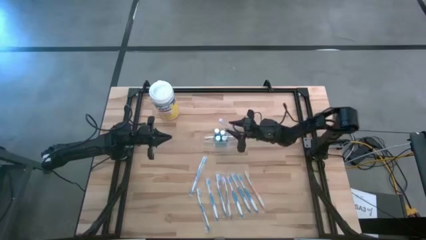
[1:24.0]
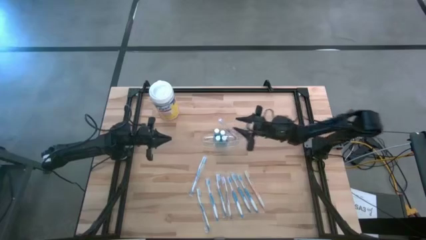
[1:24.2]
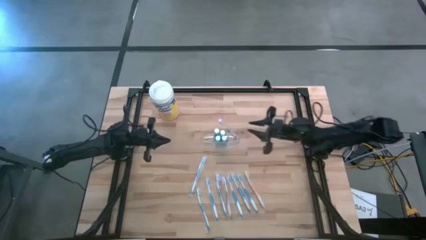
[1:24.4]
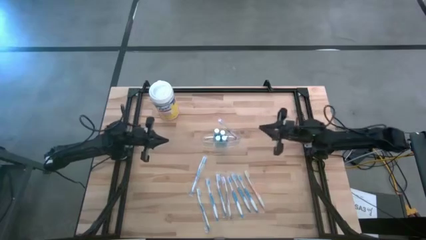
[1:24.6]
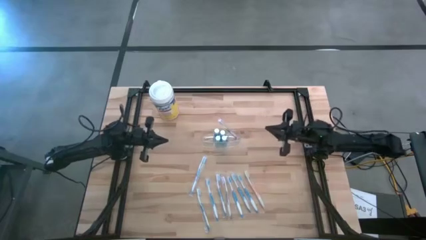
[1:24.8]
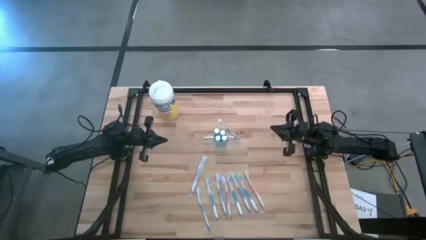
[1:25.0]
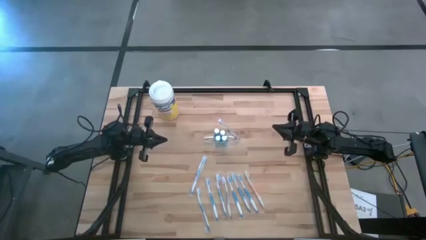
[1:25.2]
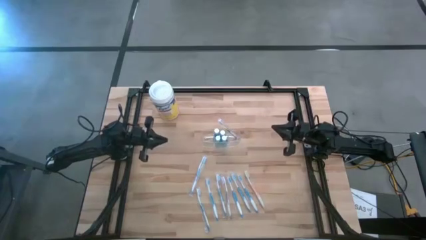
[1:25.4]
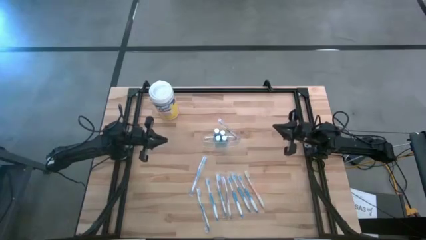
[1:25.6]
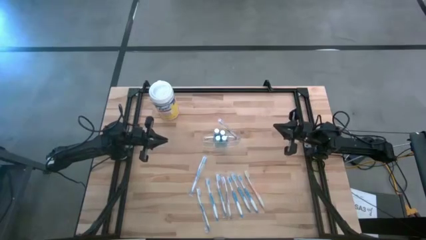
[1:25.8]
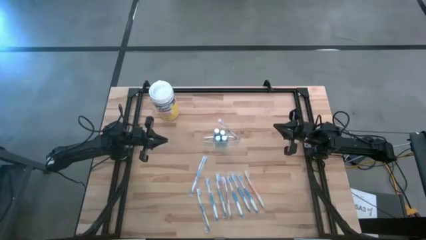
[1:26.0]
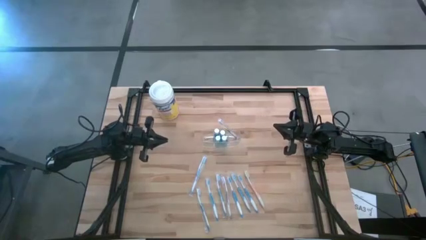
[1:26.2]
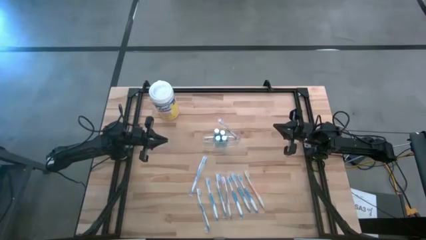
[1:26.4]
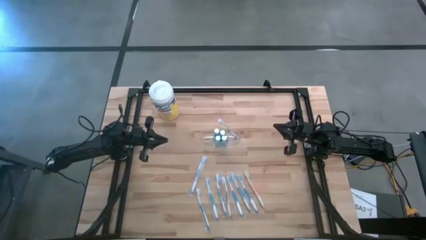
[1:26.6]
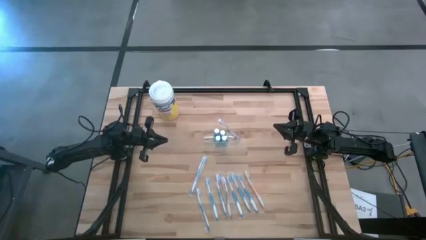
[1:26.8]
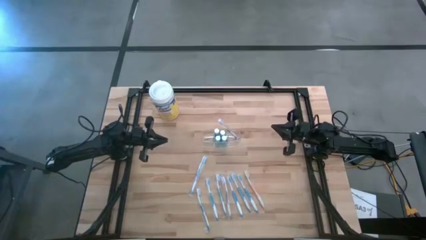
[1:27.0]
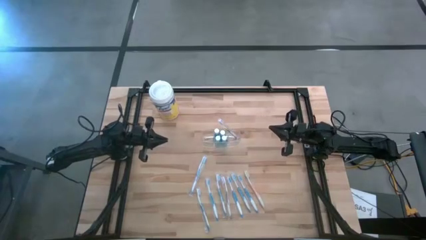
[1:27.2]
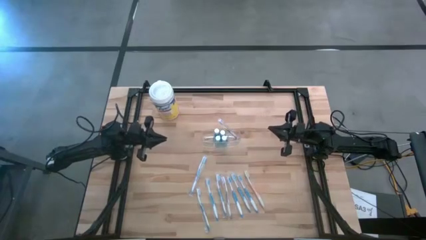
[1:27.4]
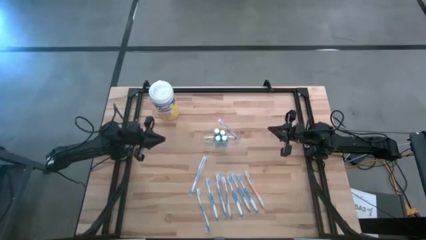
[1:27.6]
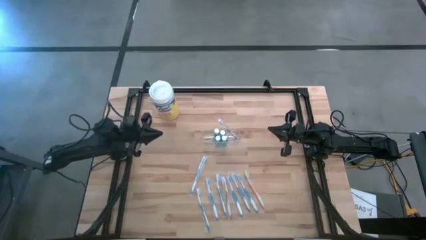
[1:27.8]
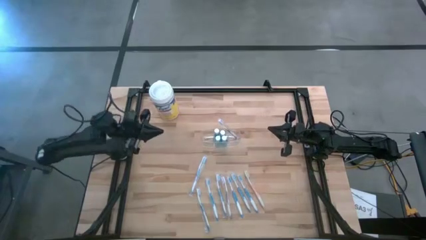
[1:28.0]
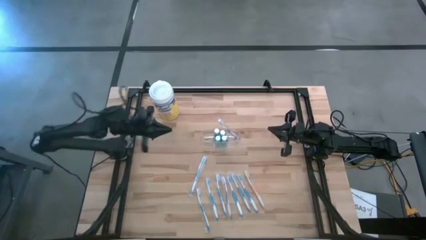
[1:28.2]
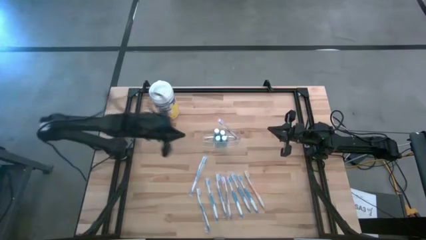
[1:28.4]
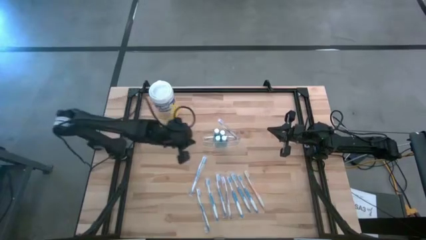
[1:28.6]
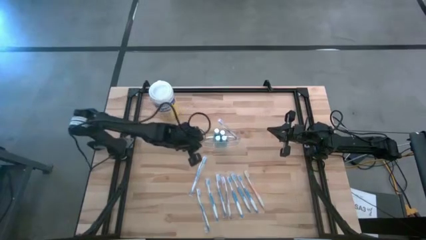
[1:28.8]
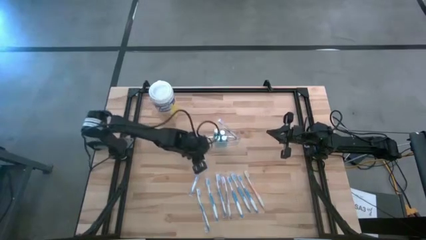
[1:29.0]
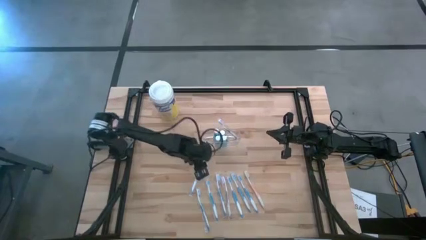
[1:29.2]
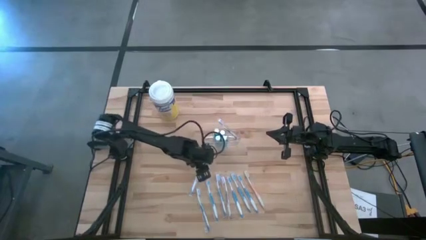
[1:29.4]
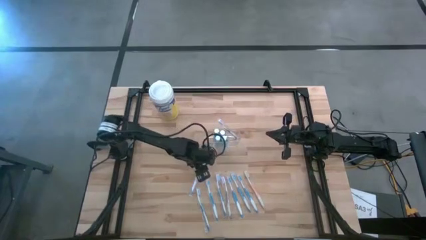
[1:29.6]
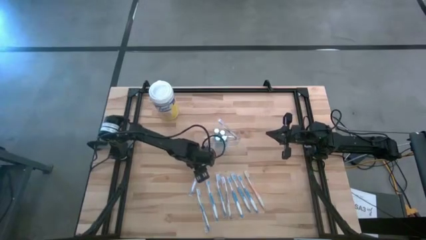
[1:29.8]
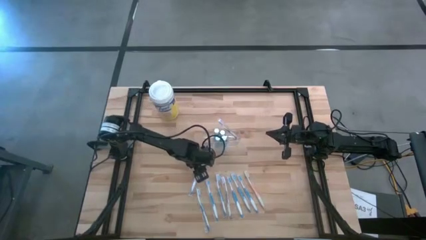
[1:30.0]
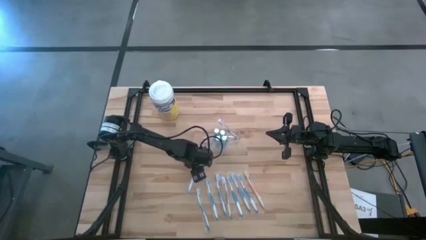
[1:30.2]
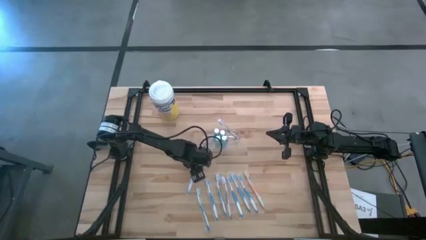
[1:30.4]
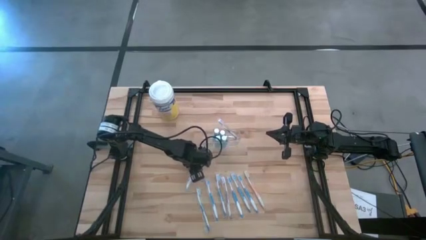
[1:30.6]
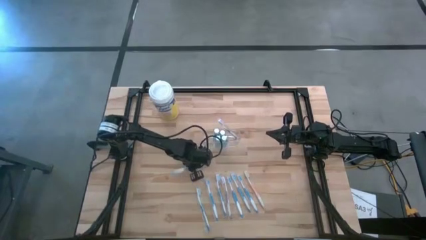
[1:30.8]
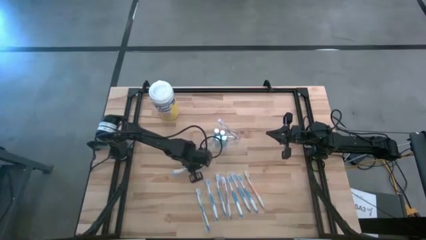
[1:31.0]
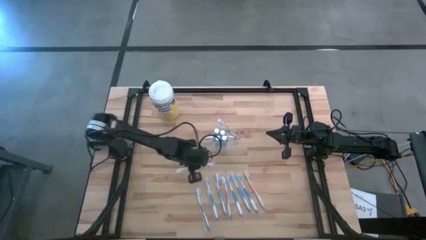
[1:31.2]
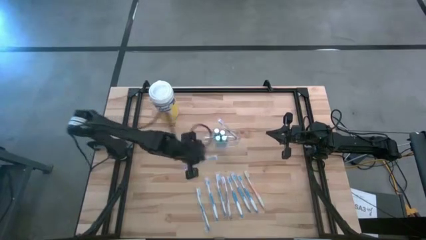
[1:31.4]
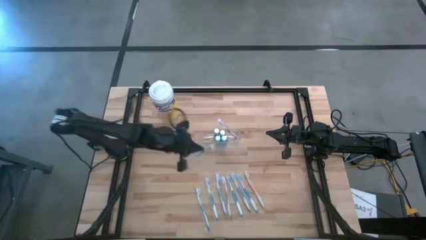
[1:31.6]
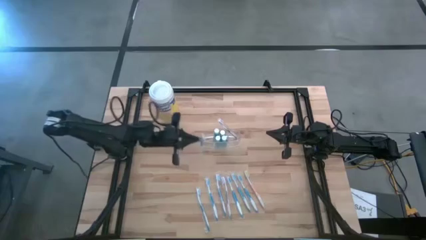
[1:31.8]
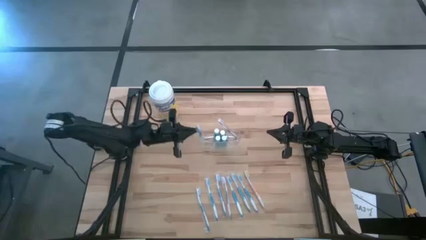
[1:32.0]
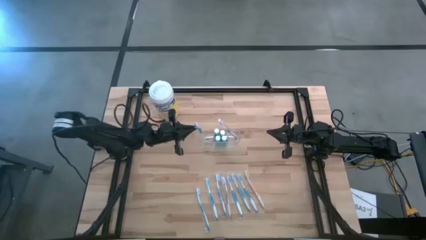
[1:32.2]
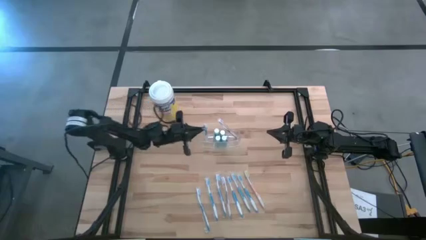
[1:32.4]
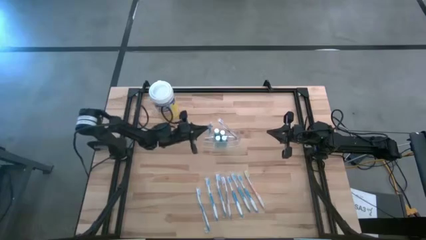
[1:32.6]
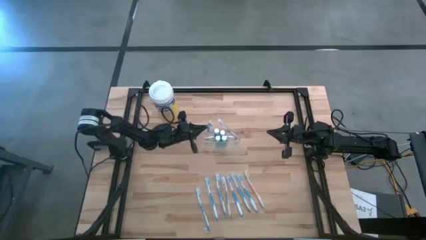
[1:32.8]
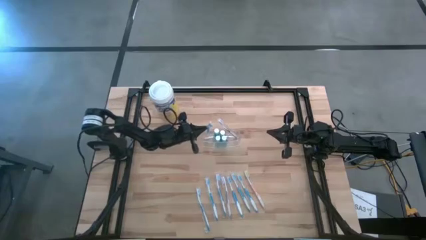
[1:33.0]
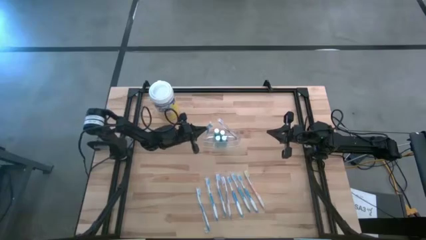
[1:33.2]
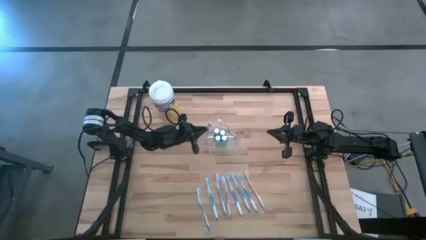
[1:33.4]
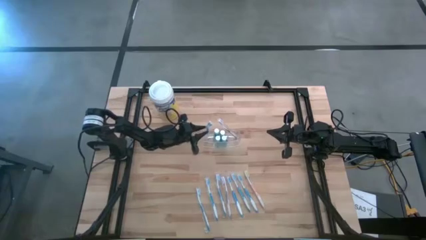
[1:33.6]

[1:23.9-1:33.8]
Task: Pick & Place toothbrushing station
Put the blue toothbrush into the left section of the transparent organizer

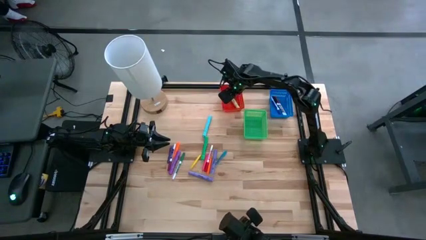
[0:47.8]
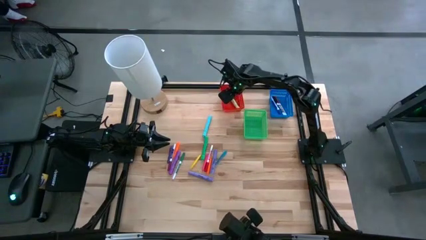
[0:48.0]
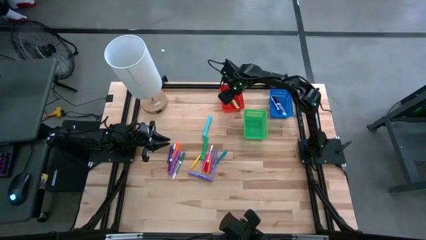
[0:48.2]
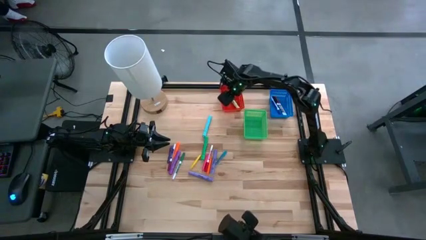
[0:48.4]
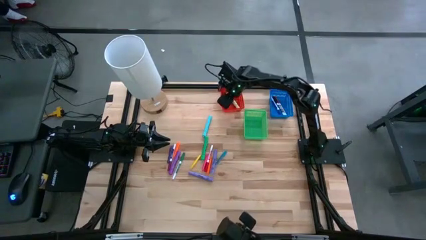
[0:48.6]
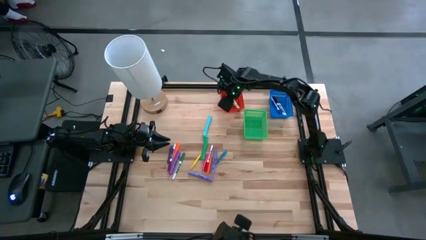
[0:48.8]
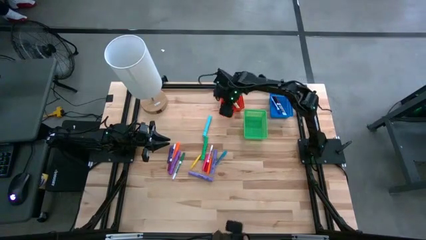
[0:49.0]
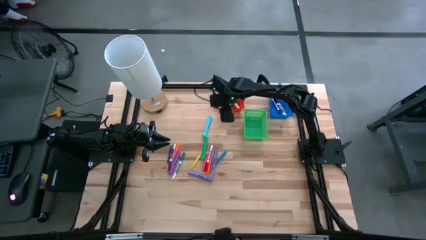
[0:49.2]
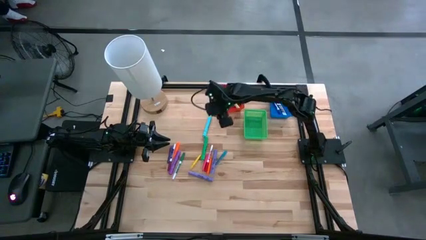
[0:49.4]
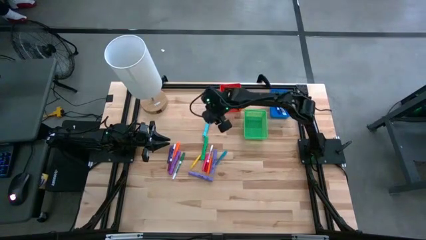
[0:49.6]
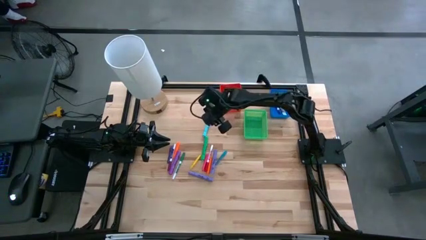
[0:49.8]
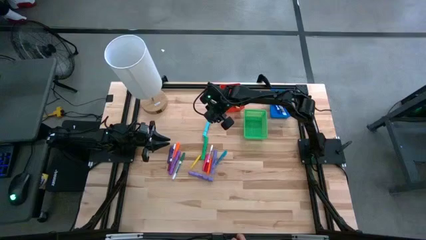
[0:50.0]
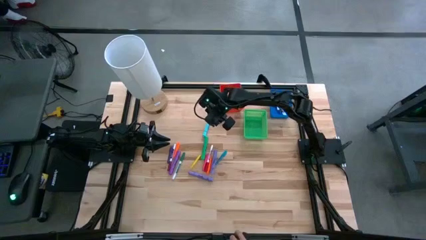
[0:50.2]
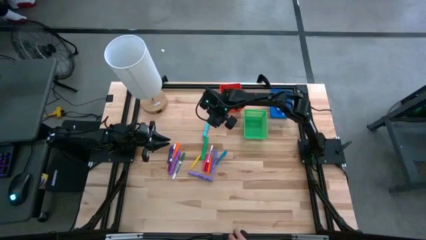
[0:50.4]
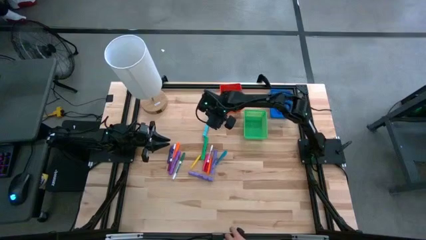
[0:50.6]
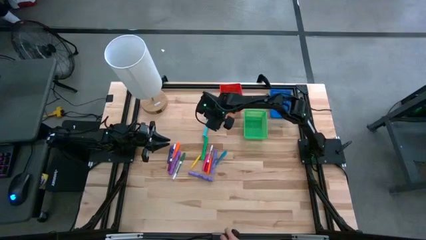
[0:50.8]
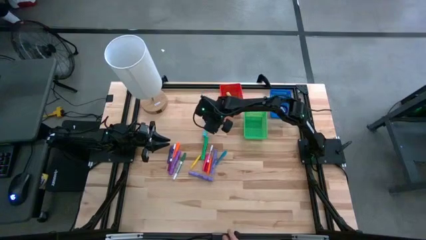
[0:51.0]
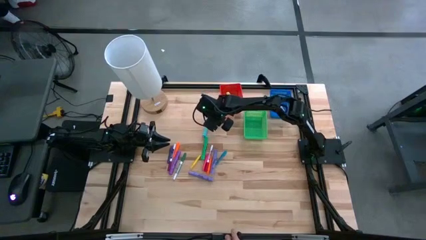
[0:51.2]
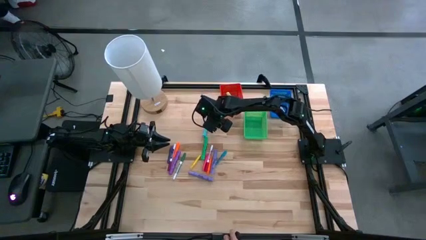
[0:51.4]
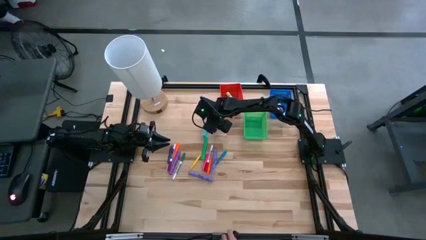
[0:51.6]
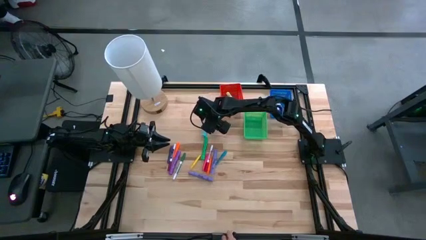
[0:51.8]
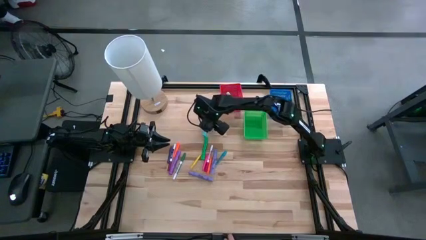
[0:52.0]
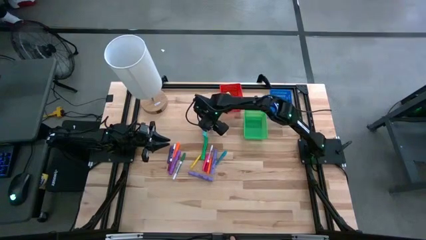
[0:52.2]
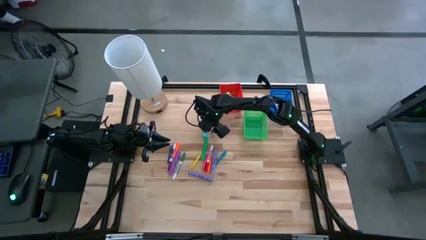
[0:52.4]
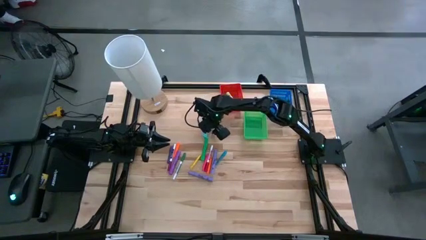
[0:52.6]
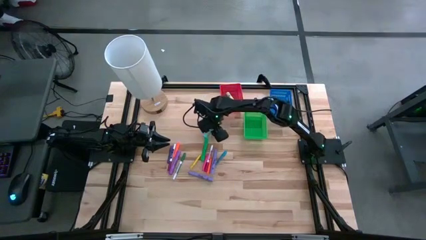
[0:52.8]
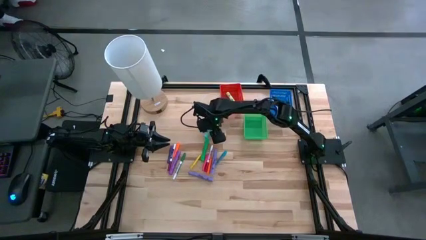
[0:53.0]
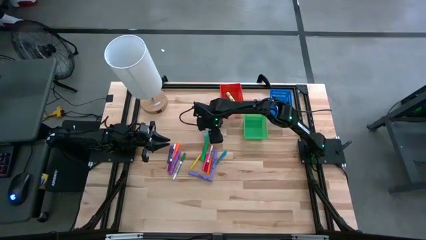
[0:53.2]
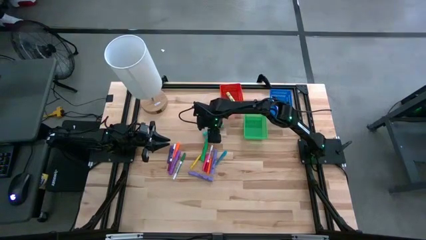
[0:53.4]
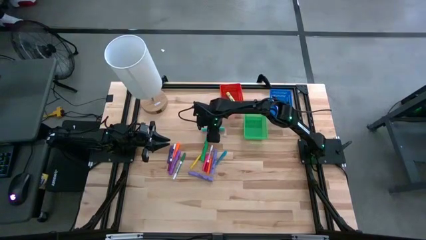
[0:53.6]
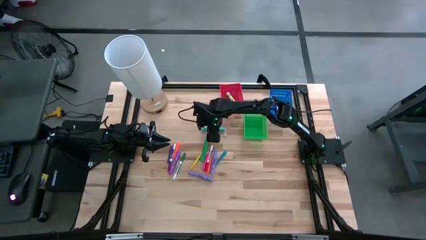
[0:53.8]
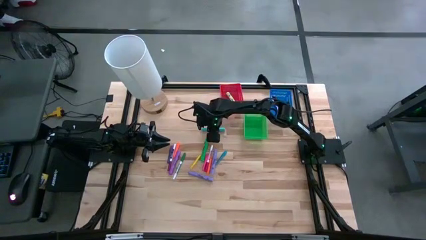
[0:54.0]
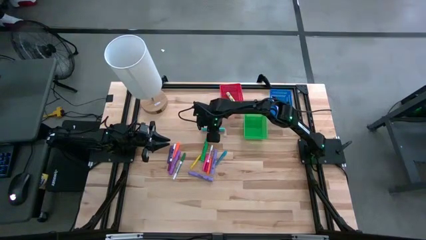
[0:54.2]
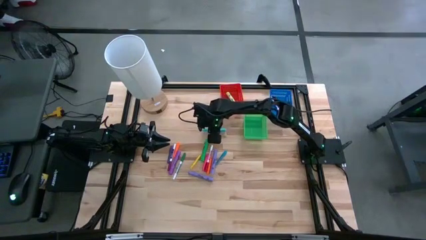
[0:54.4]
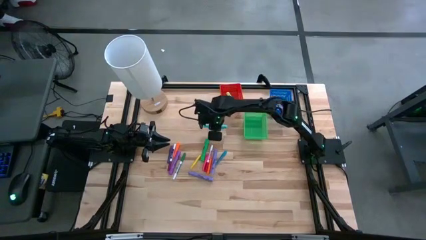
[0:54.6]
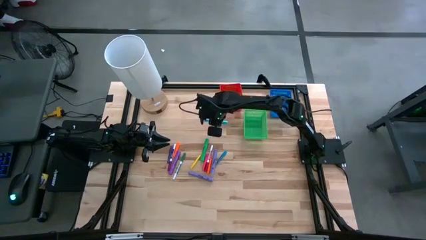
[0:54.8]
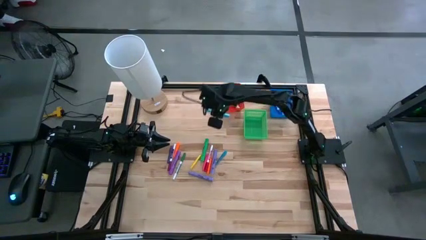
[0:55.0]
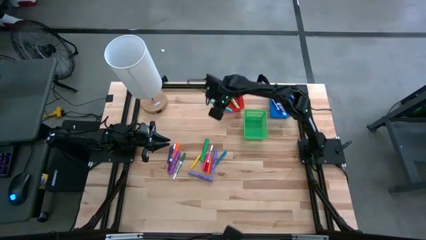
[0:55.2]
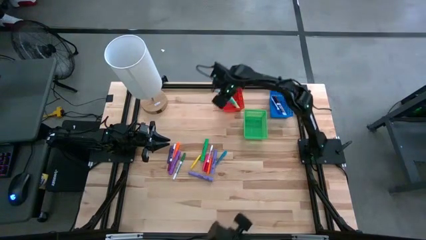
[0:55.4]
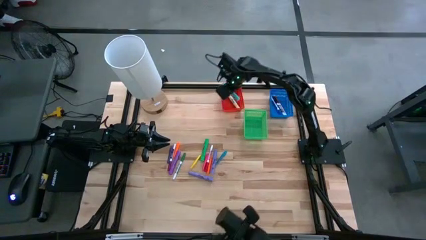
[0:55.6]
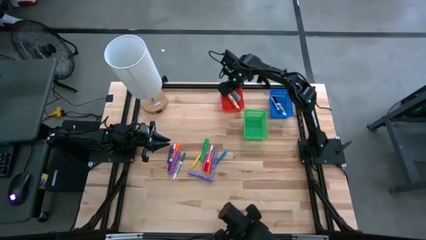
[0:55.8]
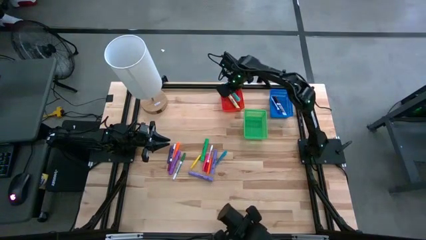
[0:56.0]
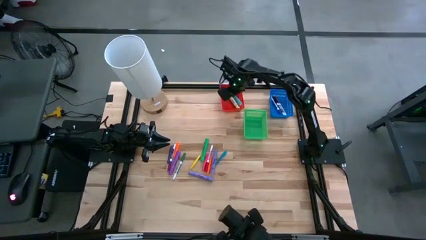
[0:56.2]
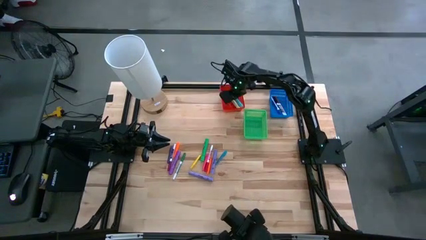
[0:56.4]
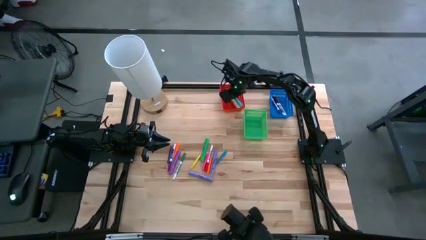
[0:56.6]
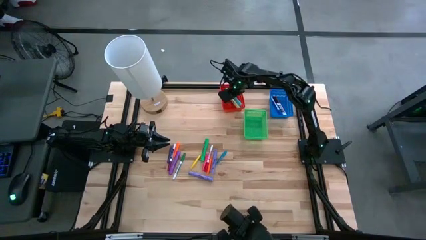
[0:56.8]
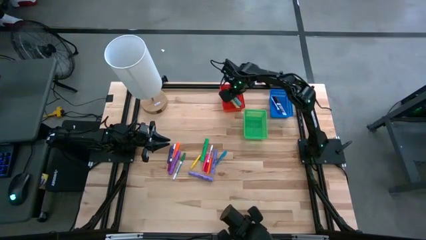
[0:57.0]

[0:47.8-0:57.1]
Task: Pick & Place Markers
Put the blue highlighter in the red bin
